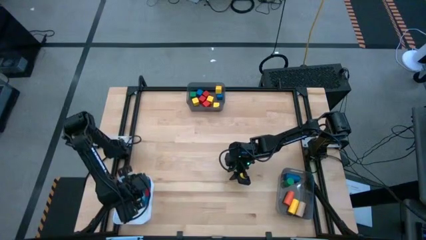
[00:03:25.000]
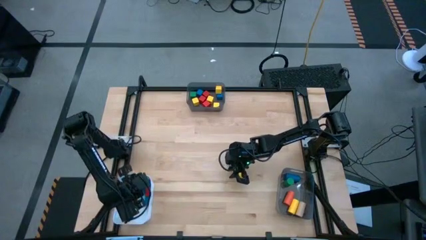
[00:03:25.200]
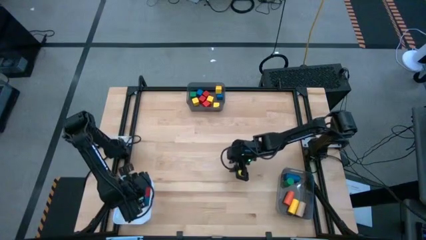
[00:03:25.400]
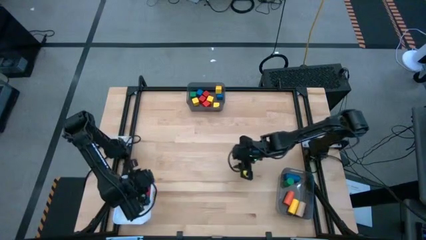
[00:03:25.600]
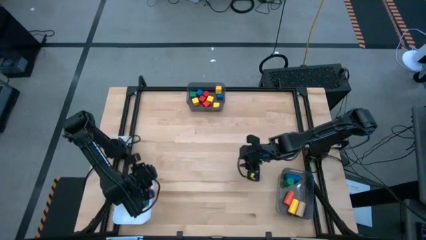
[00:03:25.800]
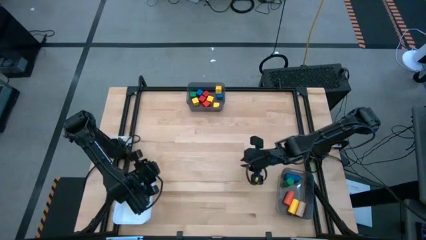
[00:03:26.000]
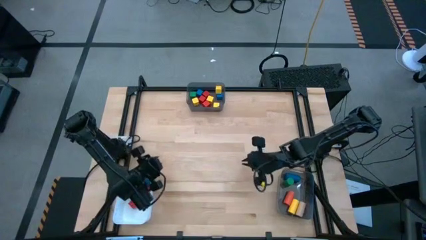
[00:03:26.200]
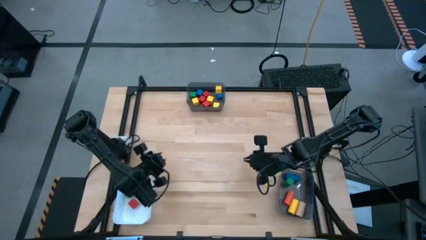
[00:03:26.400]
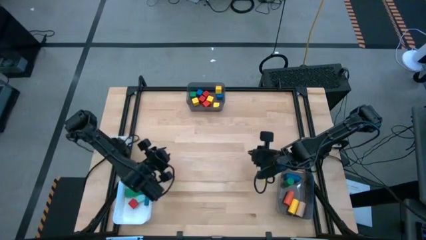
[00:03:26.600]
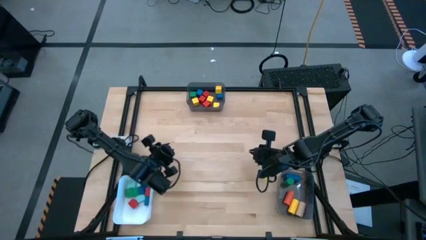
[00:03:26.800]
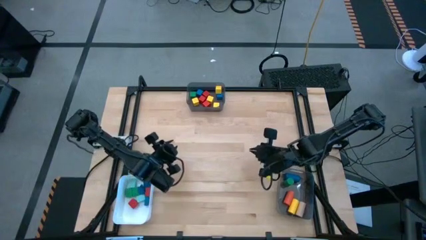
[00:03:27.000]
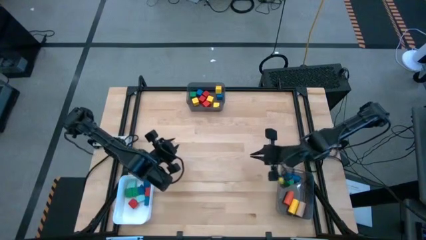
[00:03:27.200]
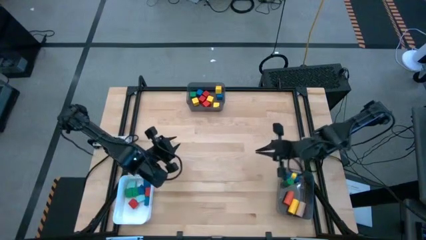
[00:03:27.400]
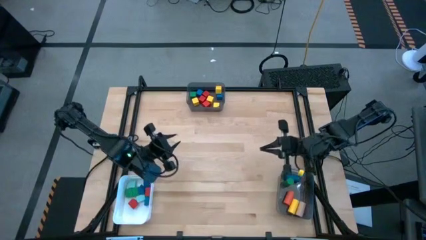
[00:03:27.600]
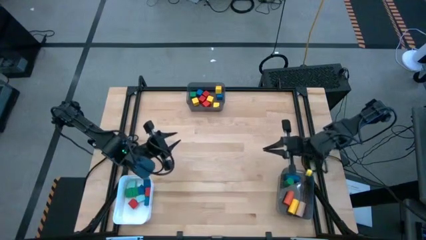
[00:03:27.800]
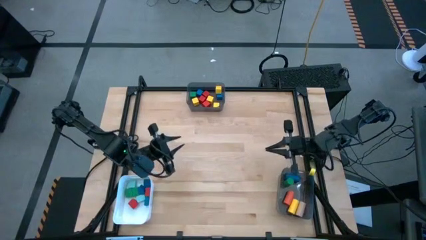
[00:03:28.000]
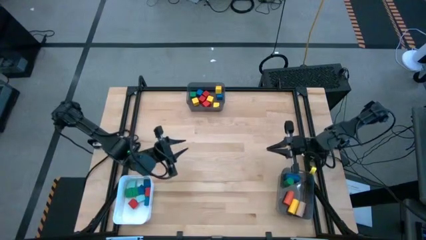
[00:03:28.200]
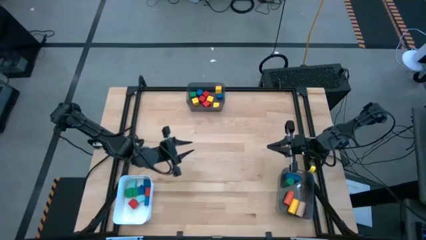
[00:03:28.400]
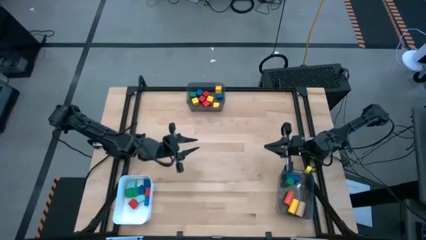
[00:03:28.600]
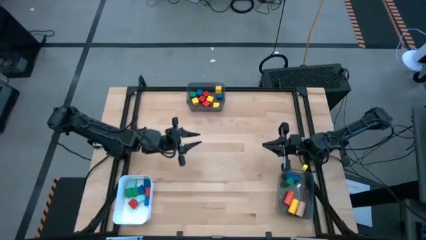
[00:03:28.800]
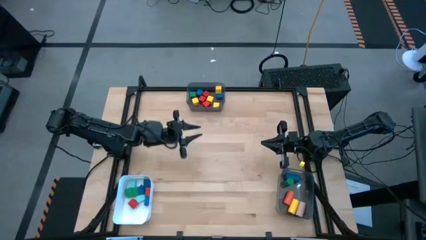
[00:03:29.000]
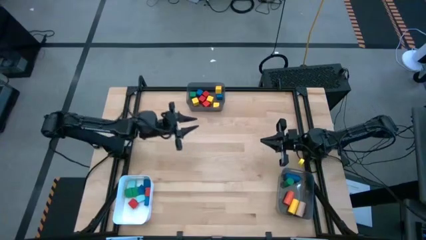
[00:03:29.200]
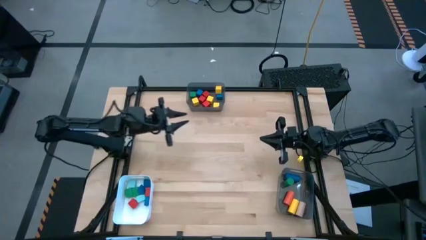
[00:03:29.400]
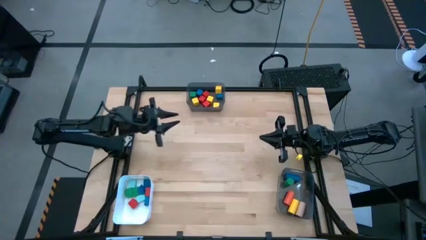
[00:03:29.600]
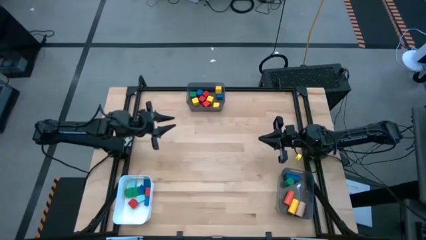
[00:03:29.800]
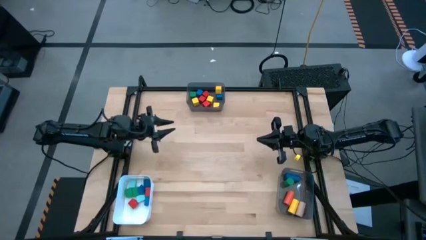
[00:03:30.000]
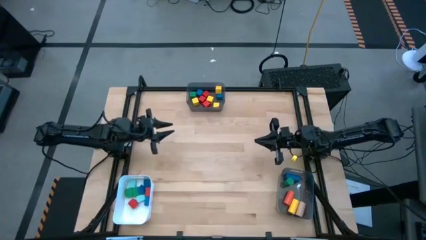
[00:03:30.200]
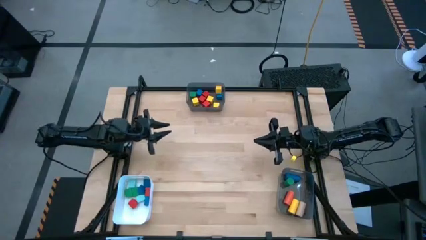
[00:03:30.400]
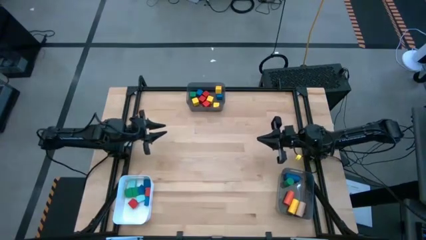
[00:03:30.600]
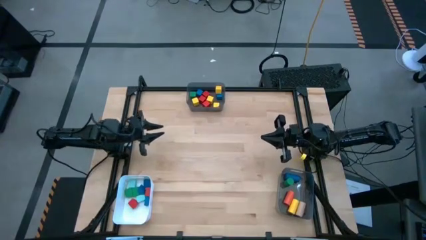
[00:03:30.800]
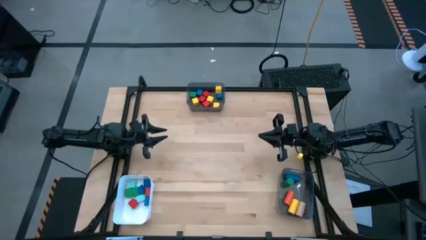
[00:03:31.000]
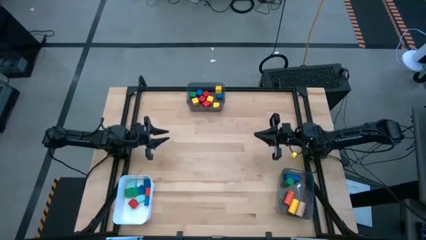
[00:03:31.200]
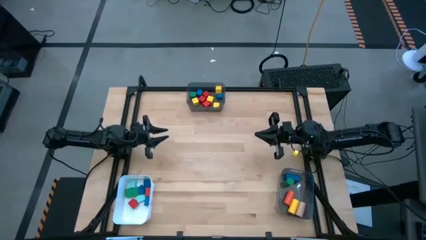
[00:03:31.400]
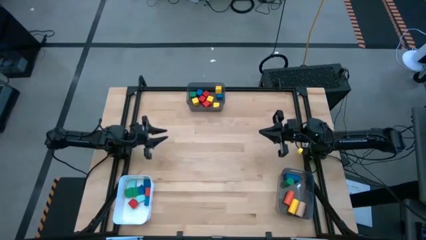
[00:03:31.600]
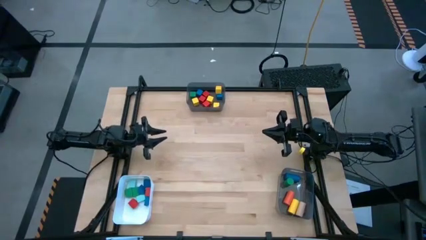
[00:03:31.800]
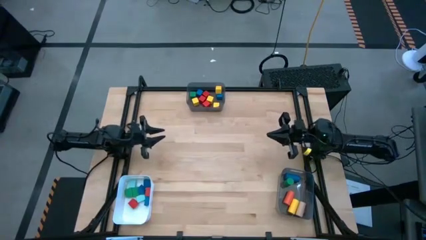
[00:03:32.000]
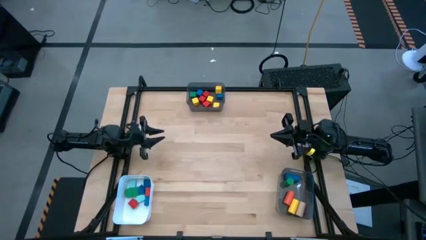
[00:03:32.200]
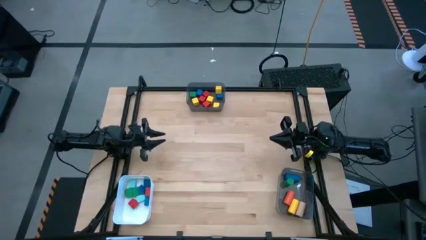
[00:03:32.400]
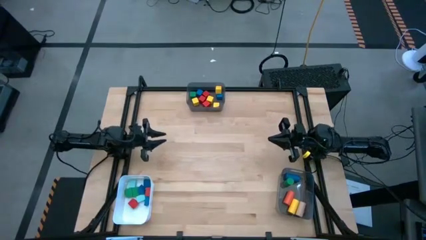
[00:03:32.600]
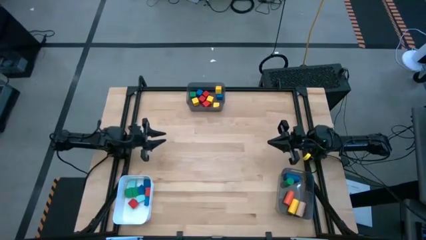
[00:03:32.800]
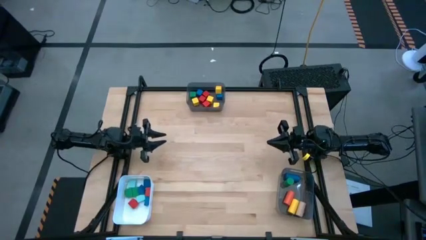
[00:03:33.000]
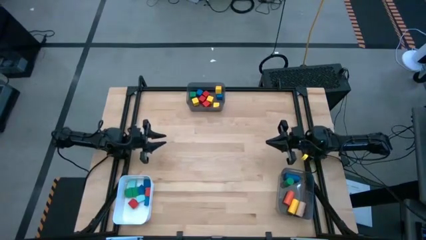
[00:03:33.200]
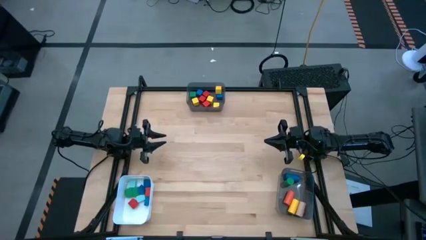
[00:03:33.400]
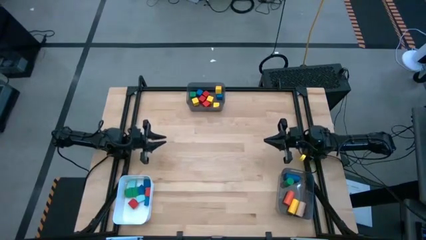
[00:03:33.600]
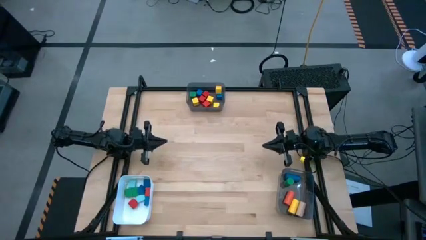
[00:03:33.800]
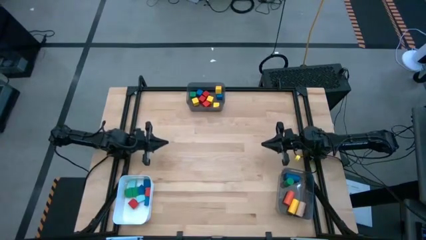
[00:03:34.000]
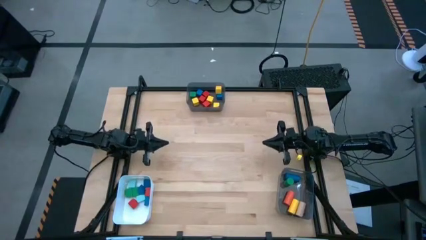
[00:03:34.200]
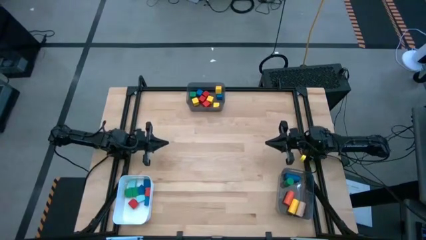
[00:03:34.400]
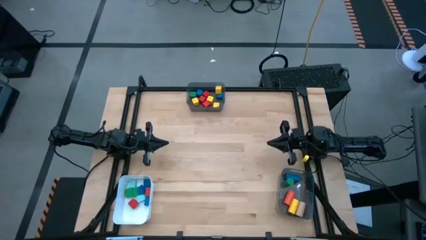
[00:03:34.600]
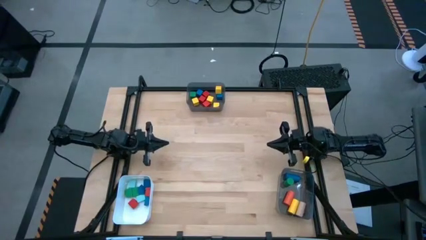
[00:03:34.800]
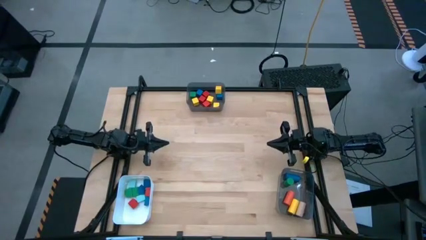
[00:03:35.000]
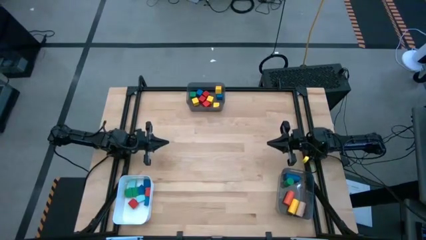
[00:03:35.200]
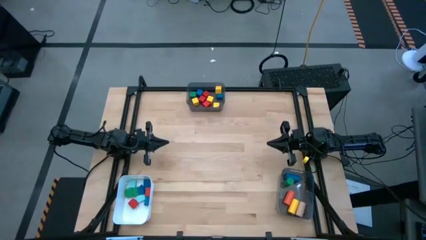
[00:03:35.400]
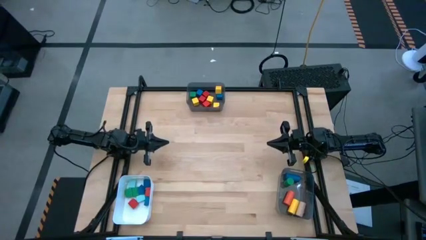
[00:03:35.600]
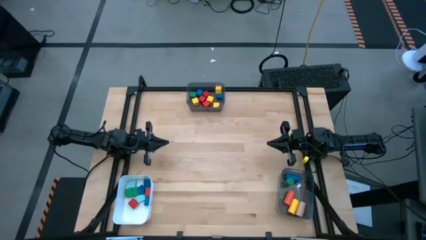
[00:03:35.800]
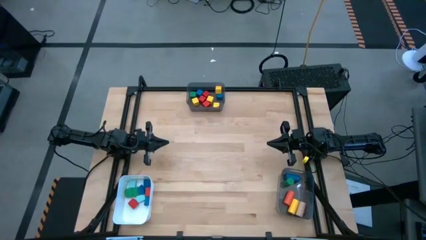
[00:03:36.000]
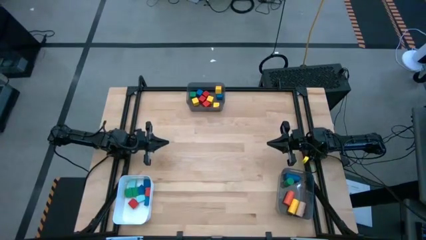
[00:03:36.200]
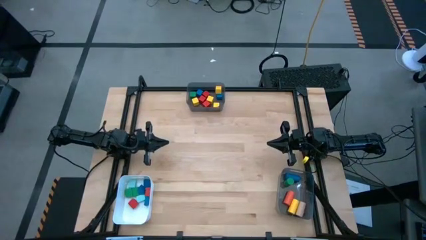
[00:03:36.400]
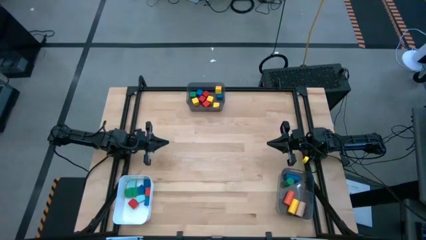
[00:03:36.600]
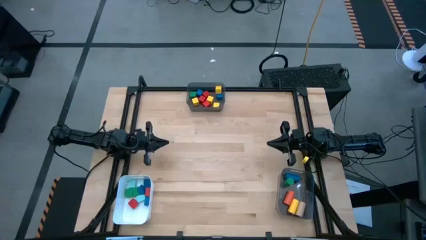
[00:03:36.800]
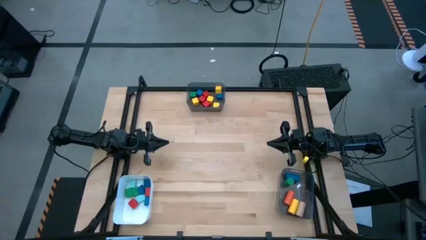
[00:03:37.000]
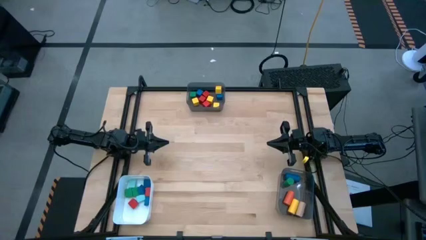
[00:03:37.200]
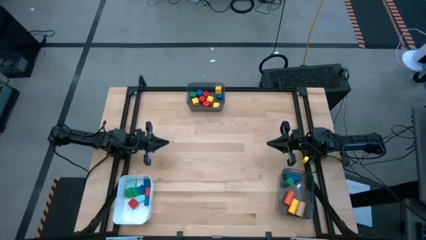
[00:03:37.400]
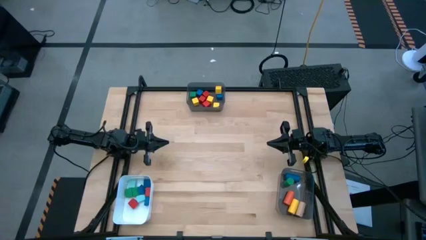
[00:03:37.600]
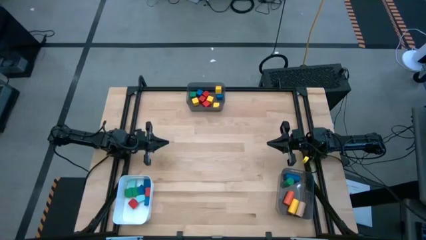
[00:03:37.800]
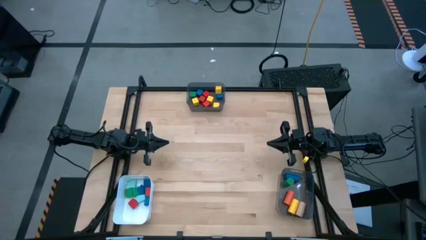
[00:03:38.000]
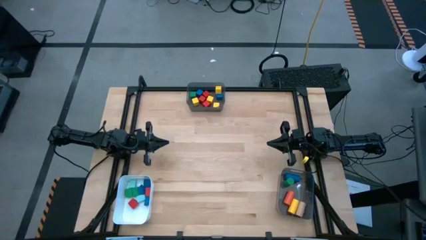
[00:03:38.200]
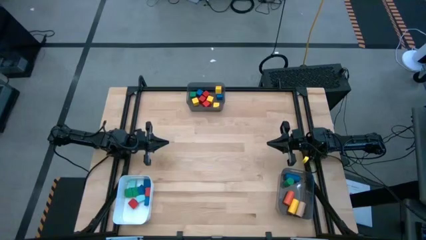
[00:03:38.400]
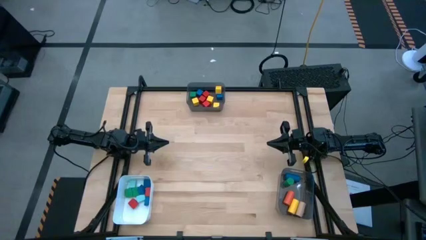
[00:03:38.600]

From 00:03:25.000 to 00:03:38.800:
Task: Sort blocks by size
Return to Home Position
